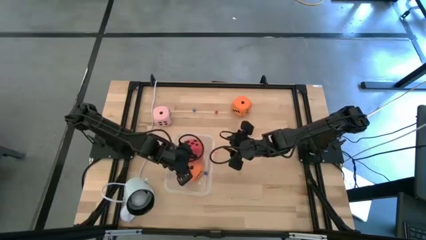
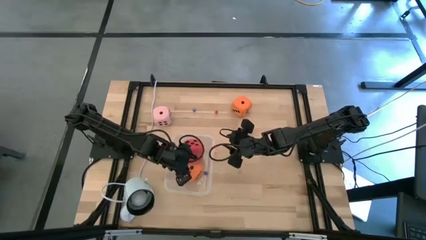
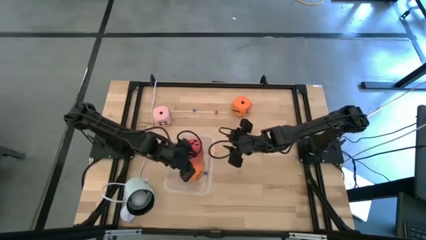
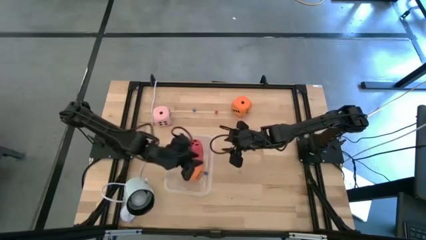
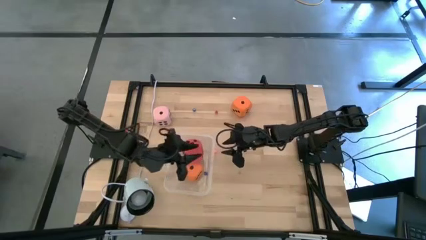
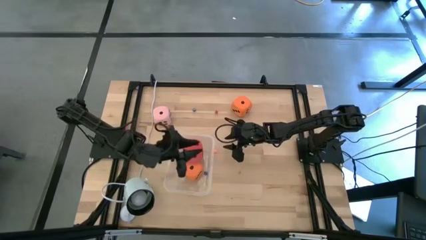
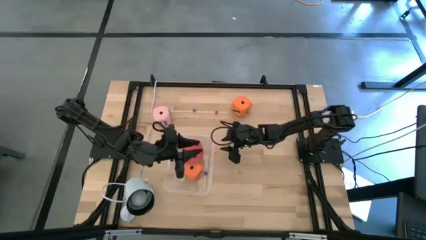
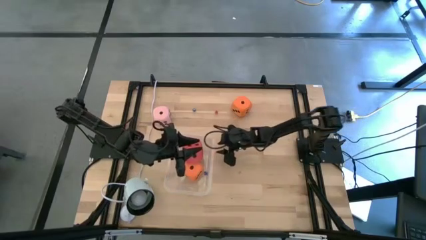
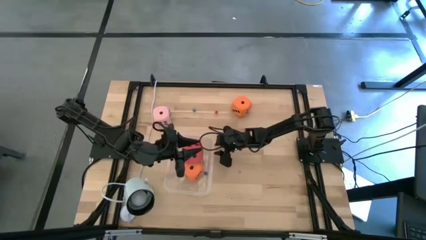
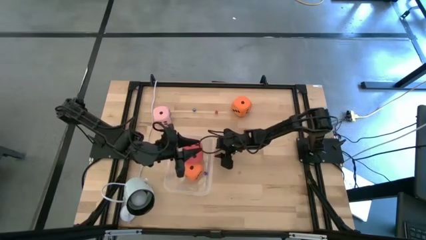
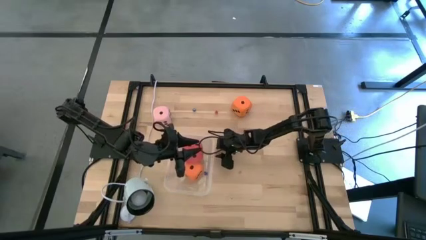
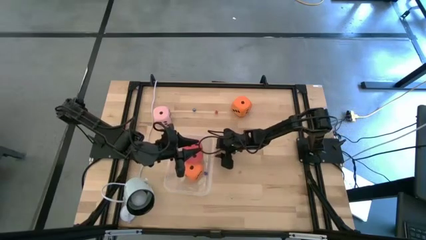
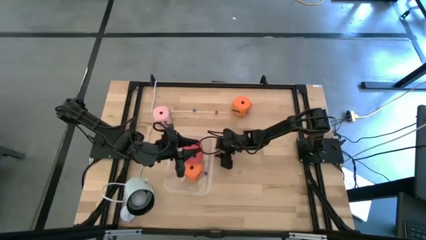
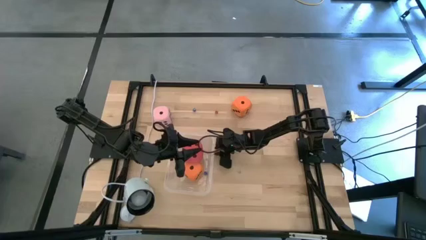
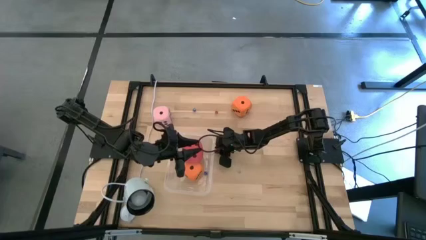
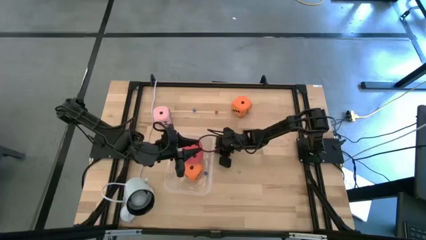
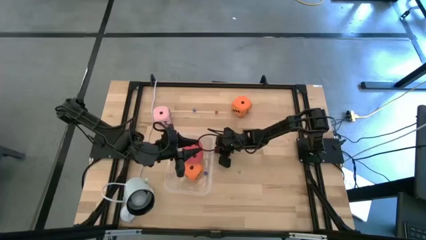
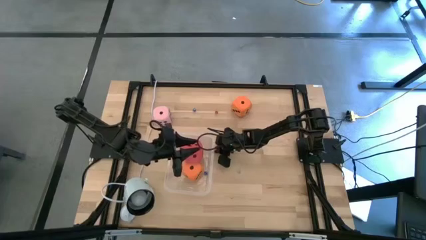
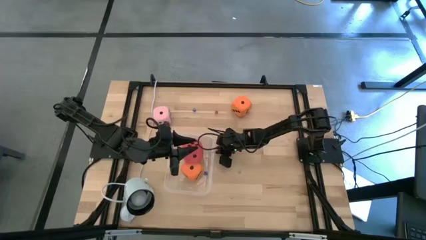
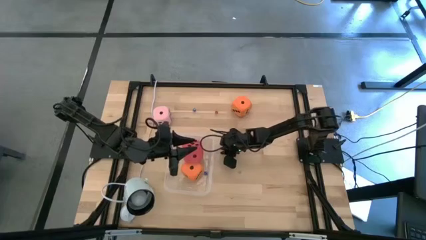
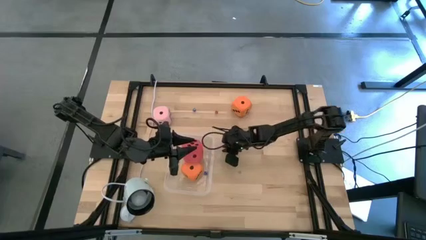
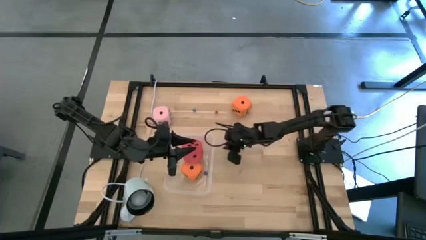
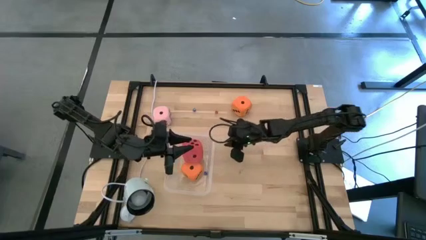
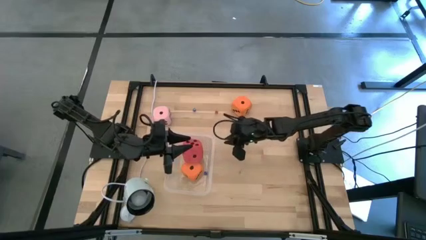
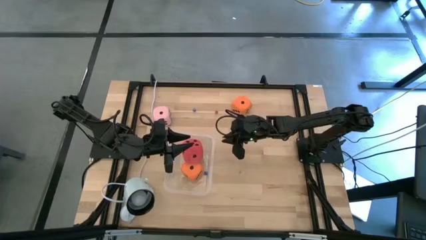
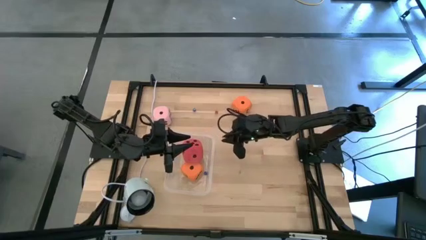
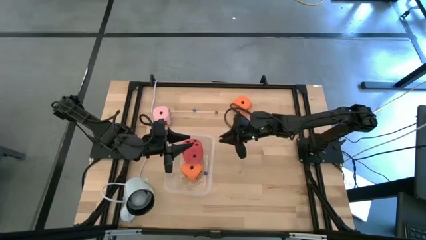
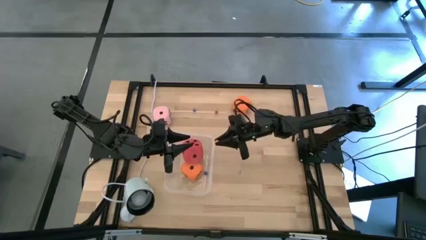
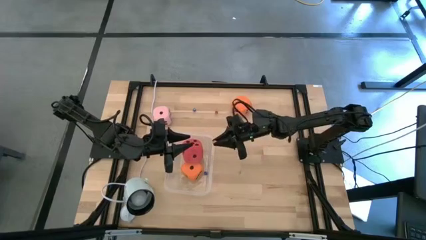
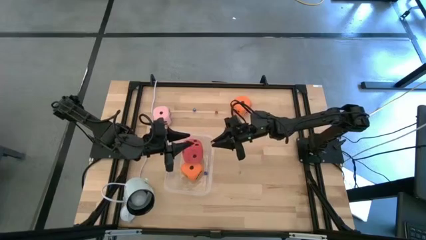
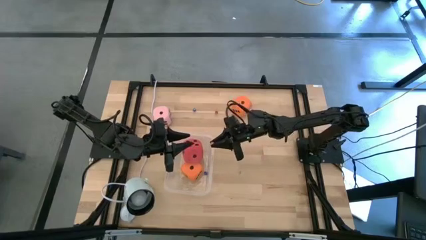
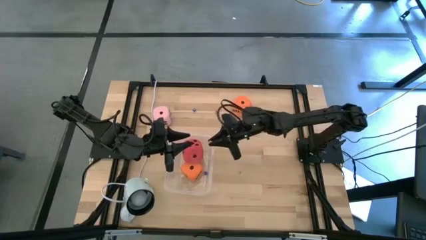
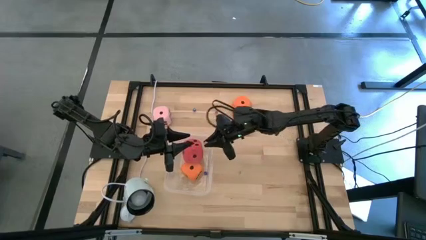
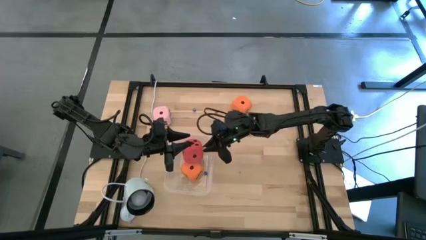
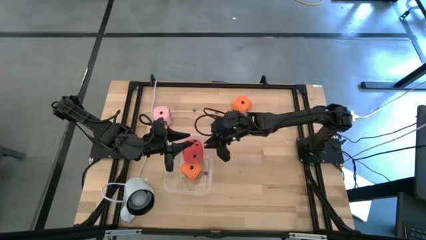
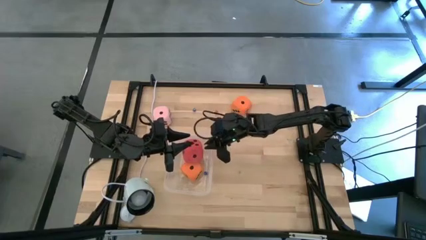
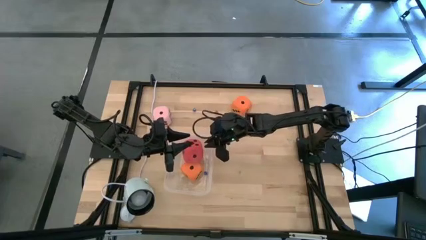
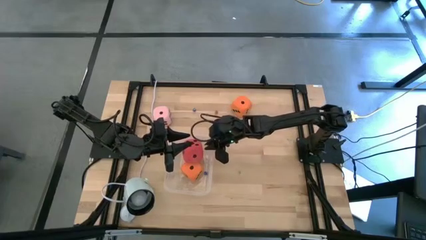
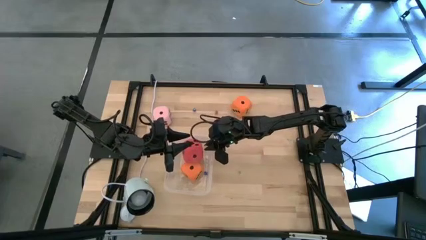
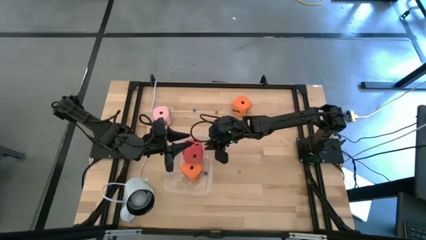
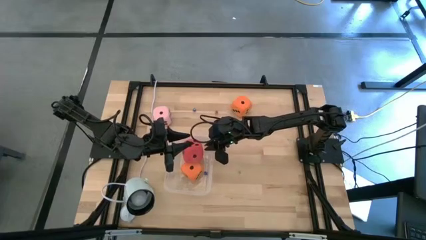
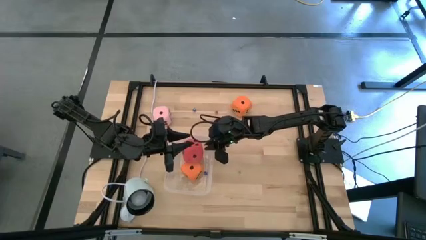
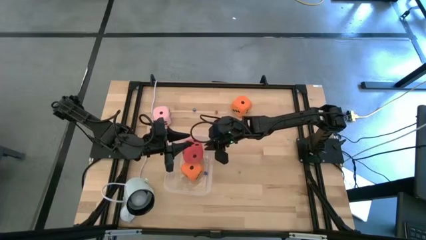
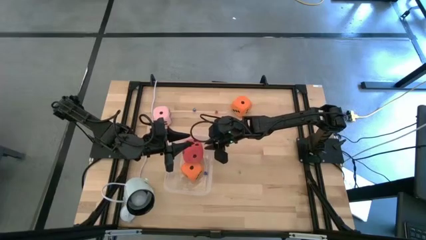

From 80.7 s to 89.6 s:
Task: Pick & Place Dice
Put the small orange die on the bin

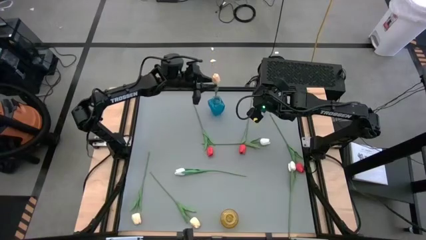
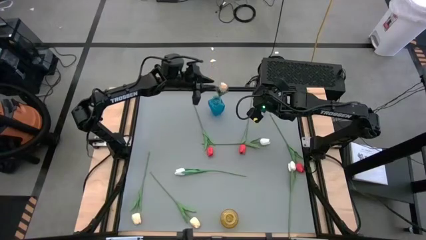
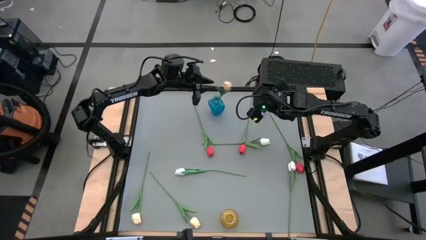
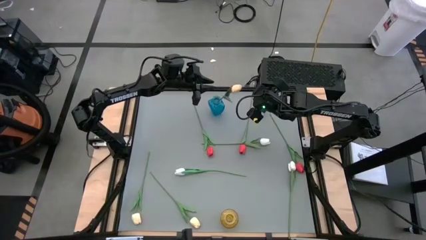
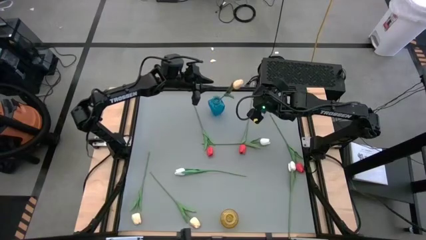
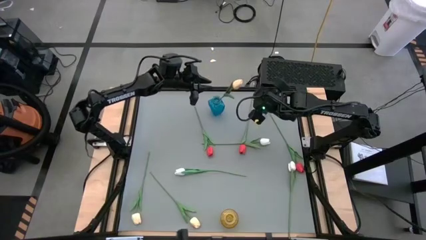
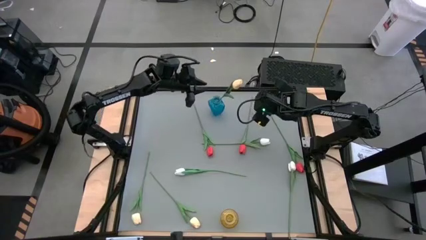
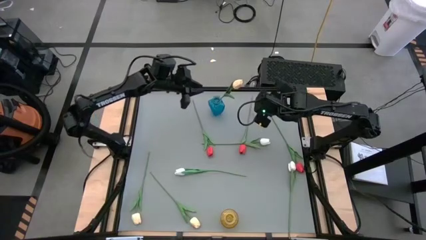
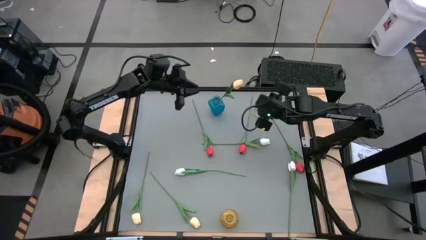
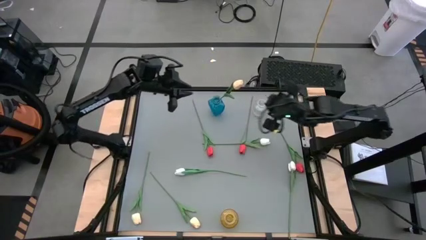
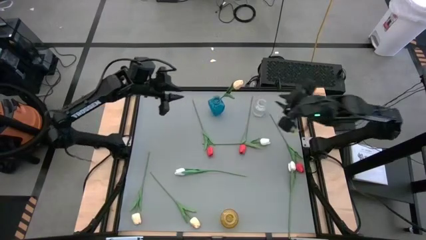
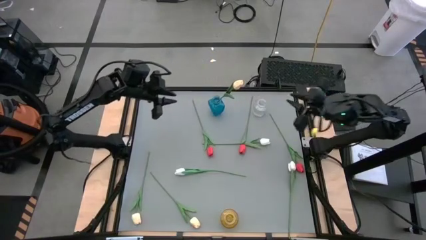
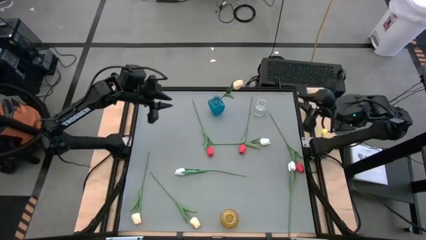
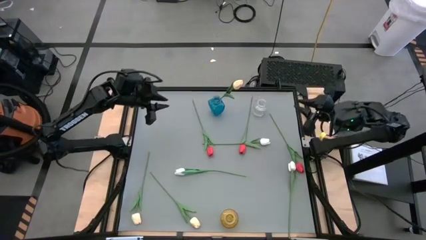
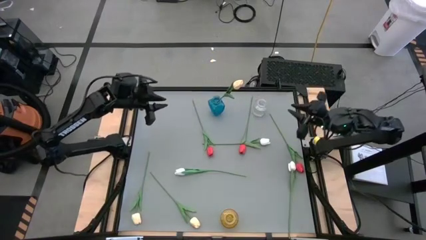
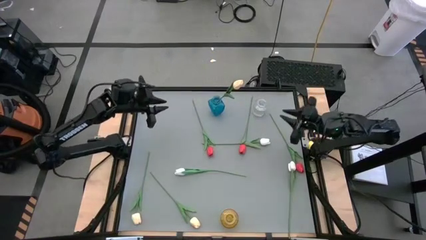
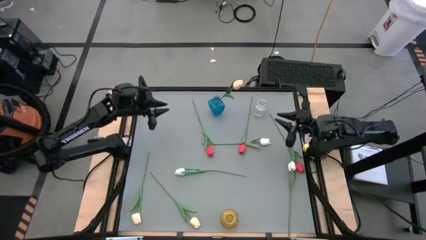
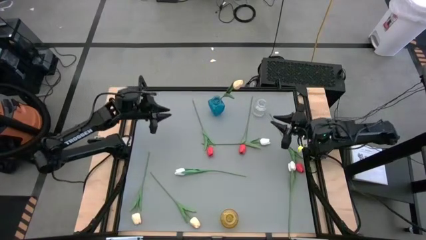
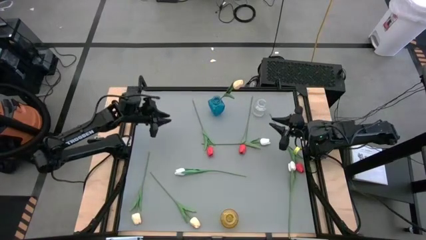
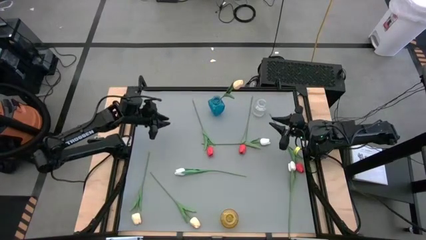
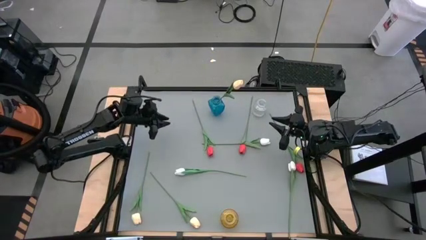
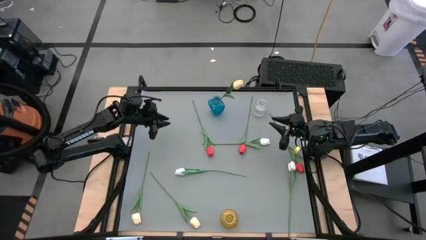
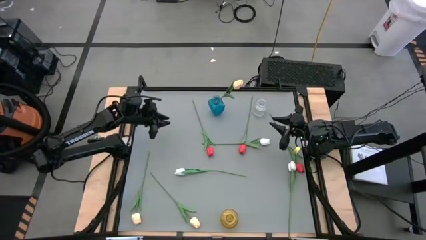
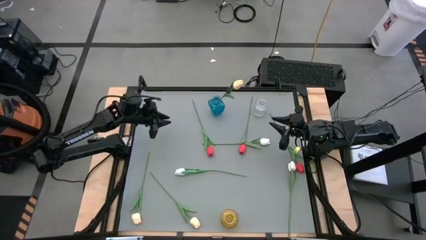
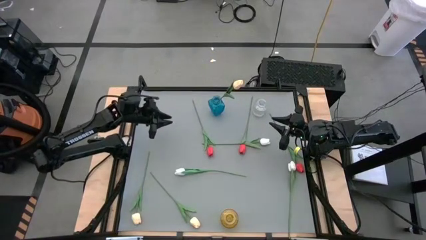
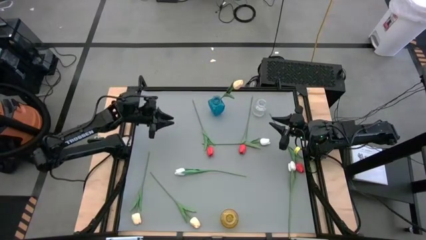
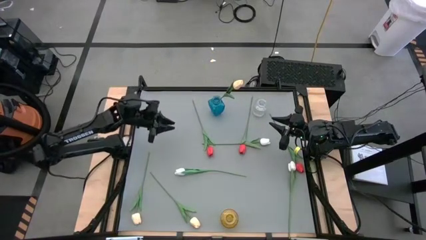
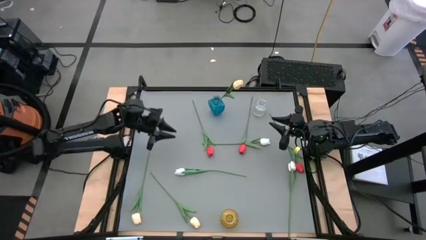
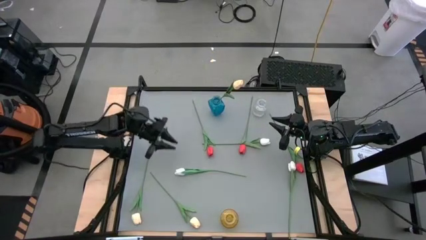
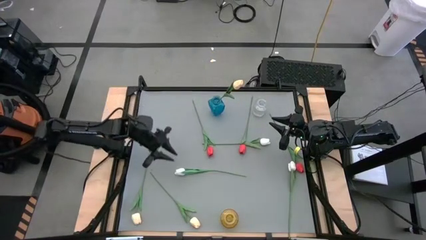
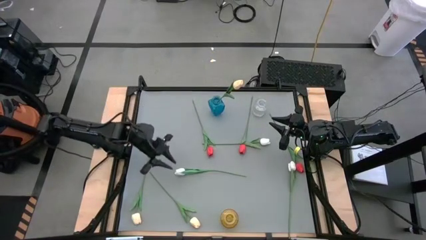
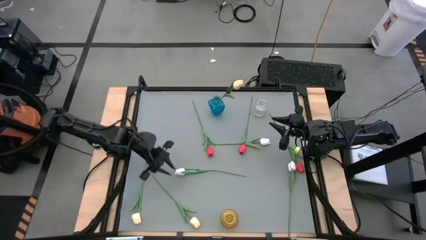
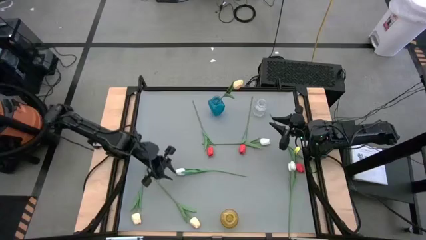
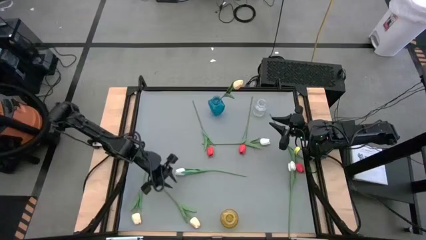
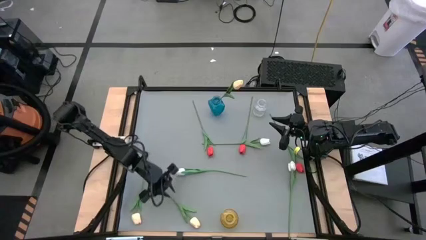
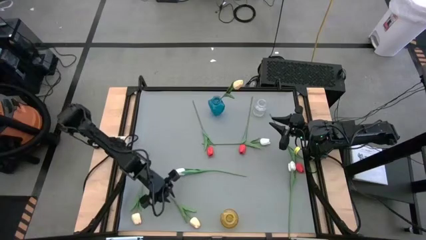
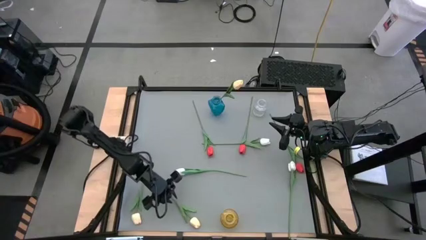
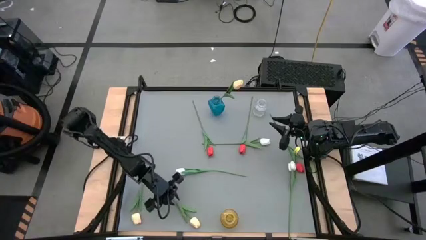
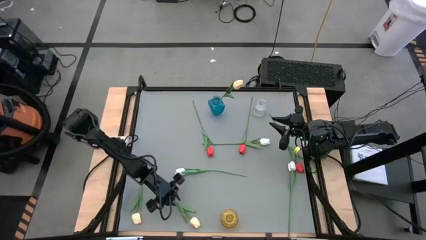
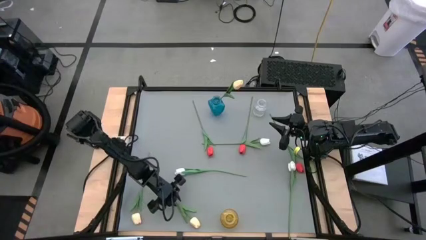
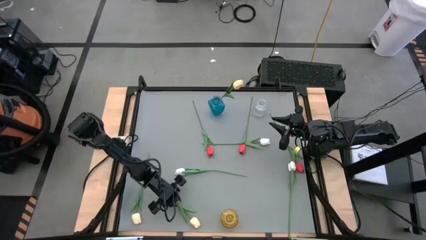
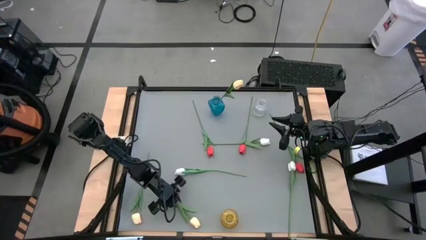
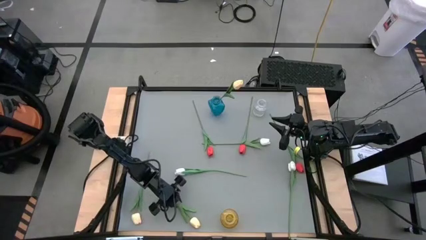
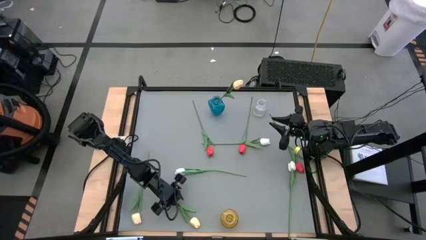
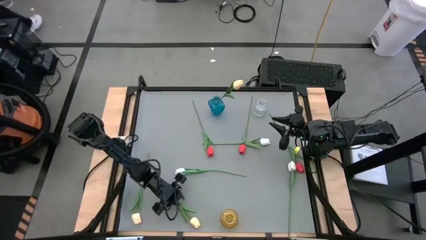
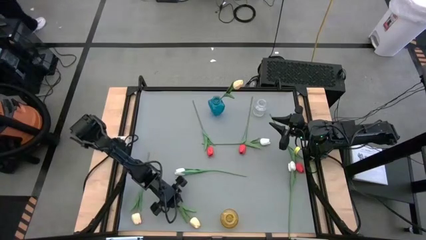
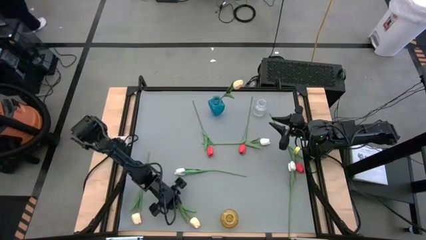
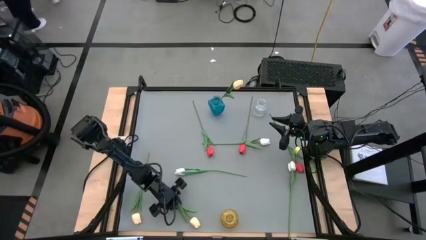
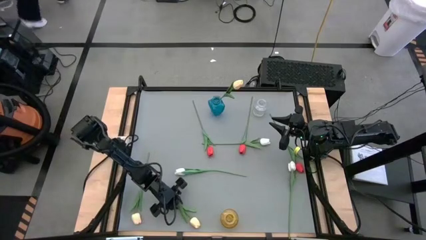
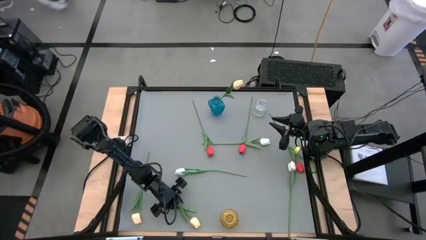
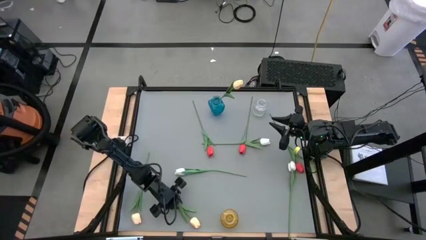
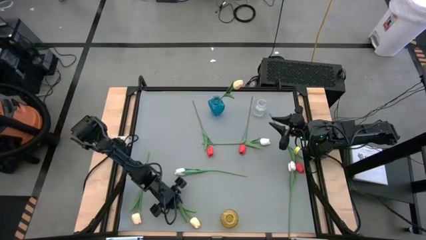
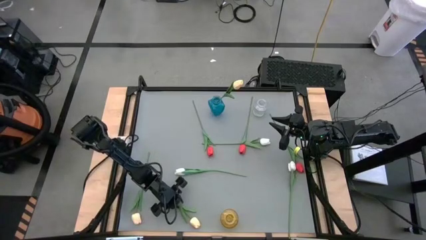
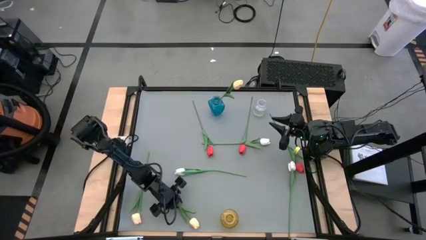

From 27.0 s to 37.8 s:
Task: Sort flowers into vase by color
Put the right yellow flower into the blue vase
